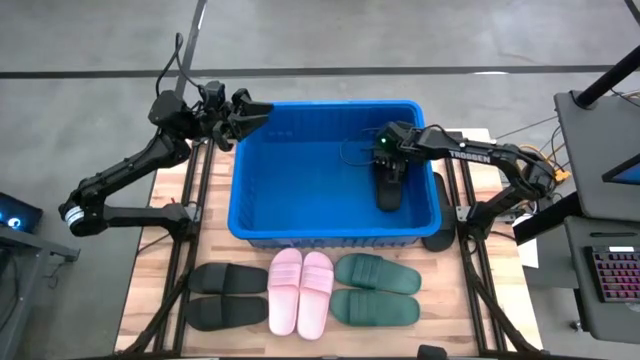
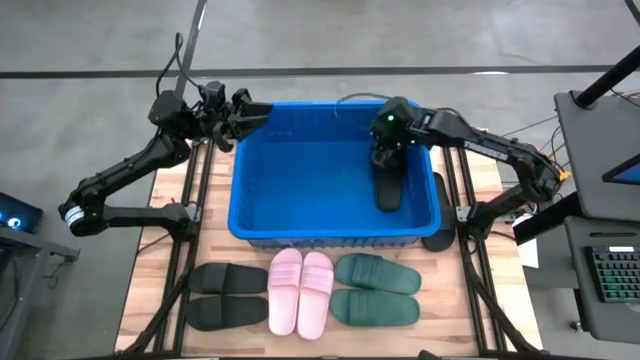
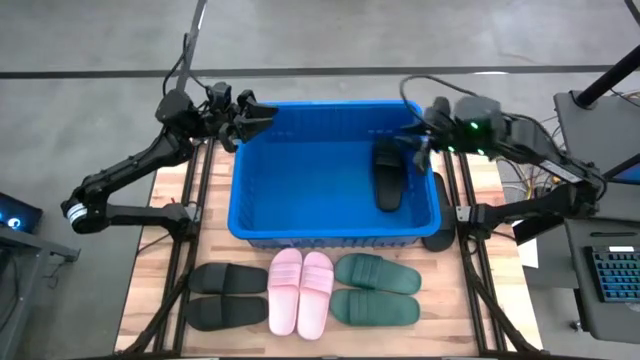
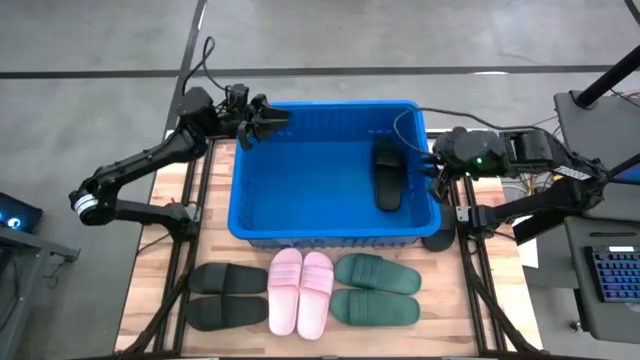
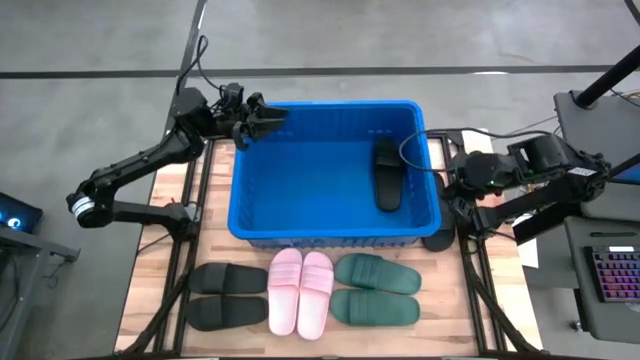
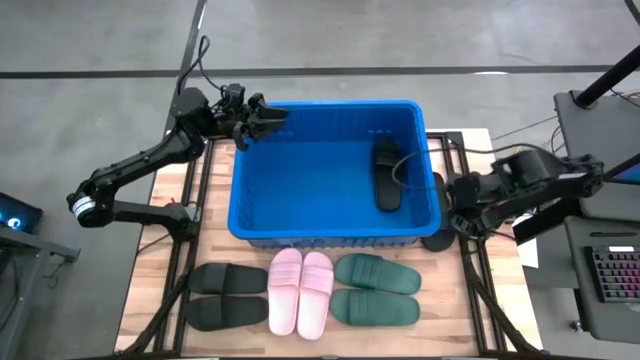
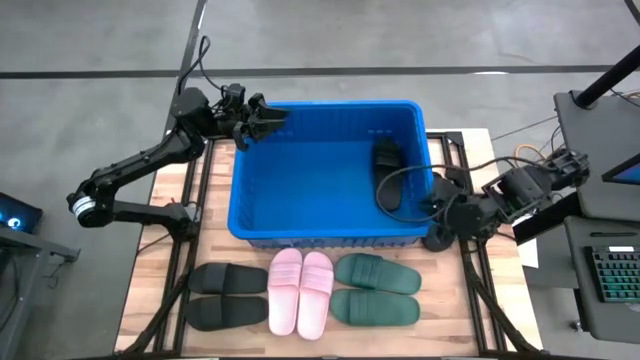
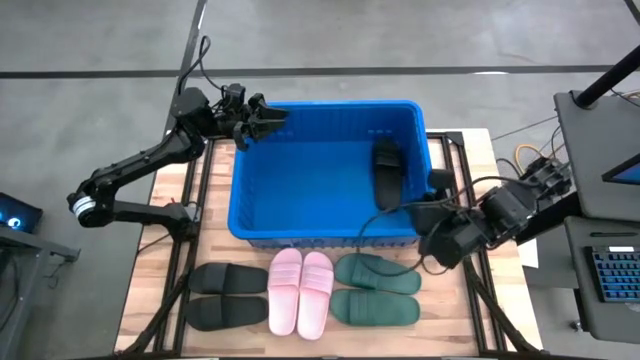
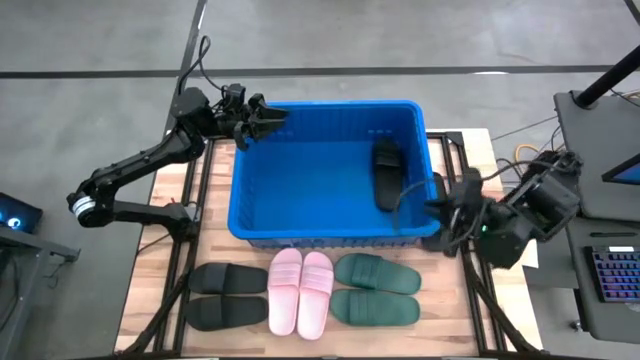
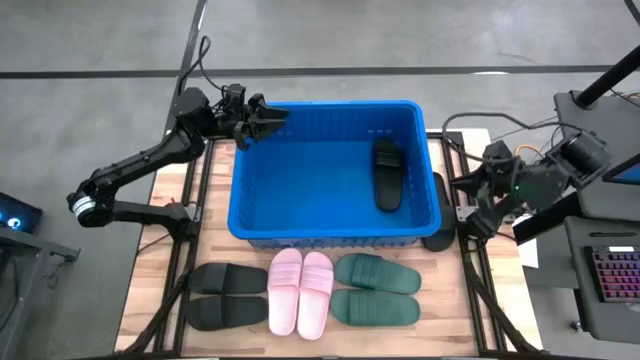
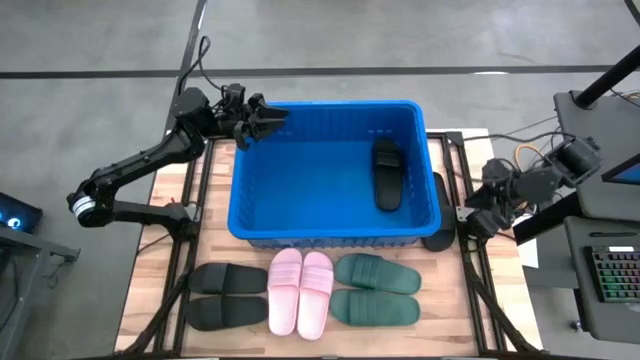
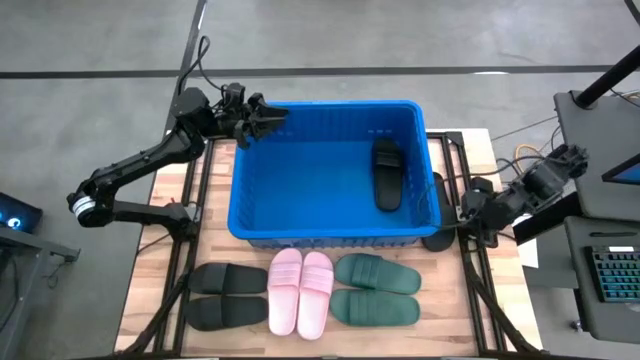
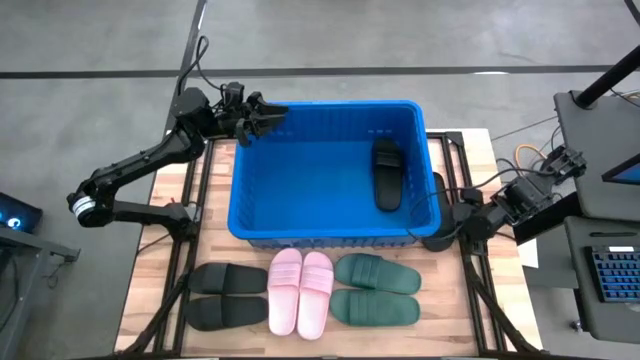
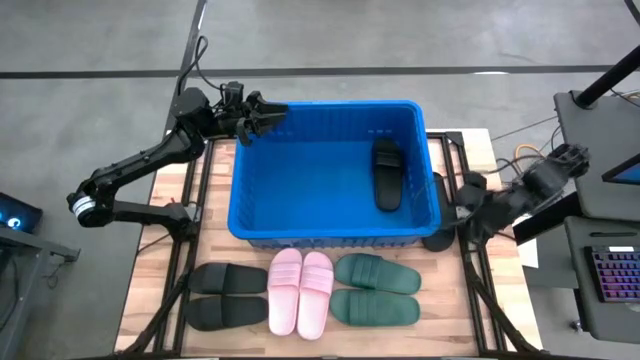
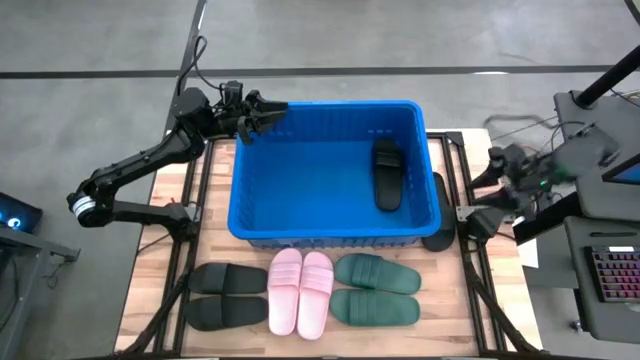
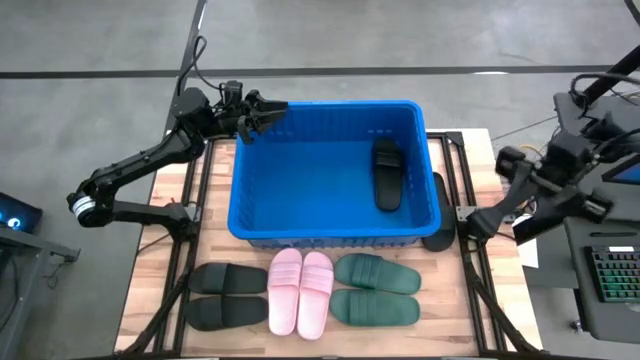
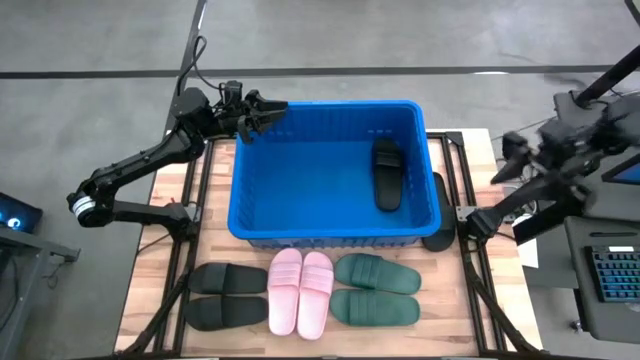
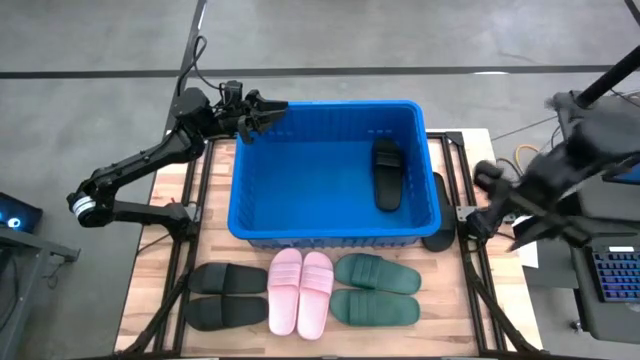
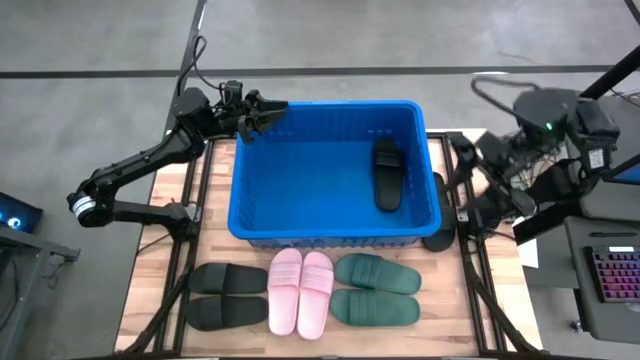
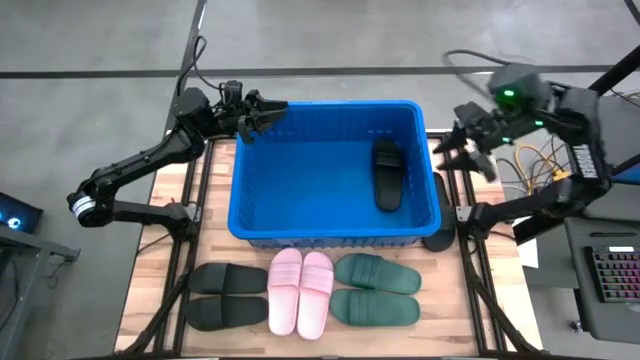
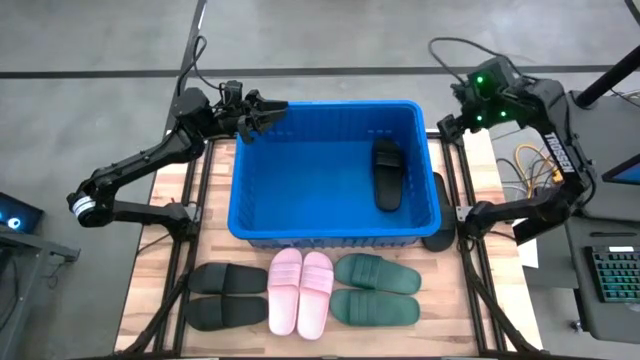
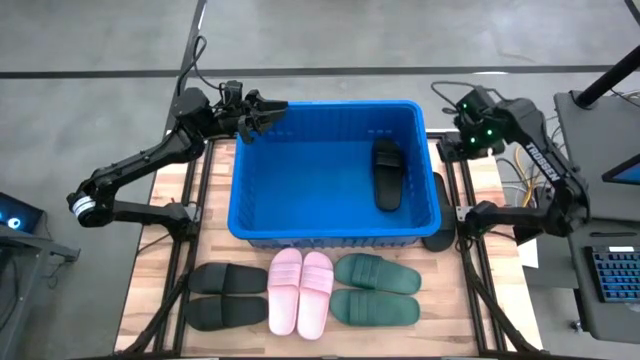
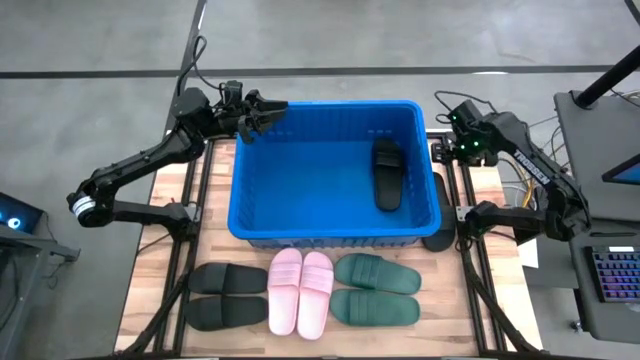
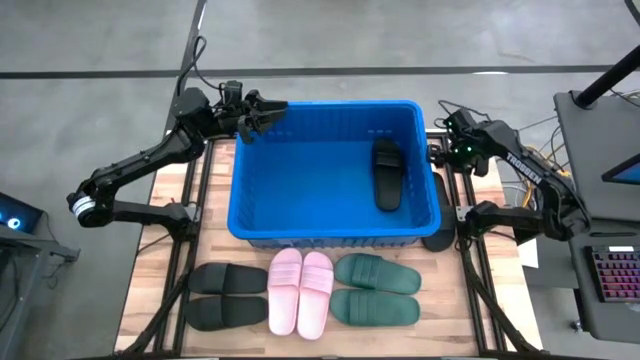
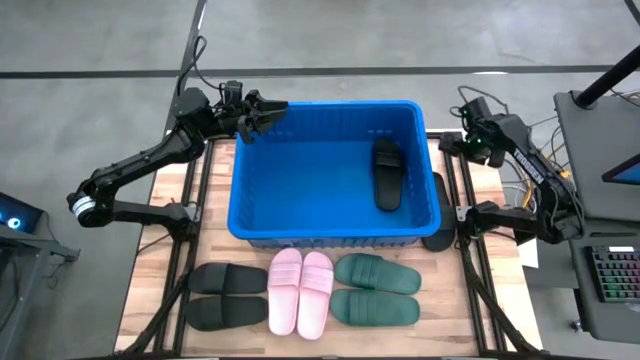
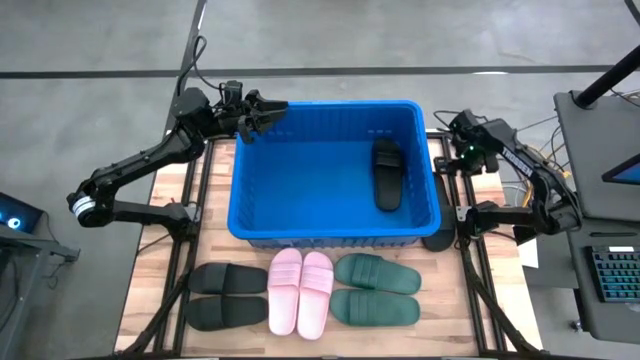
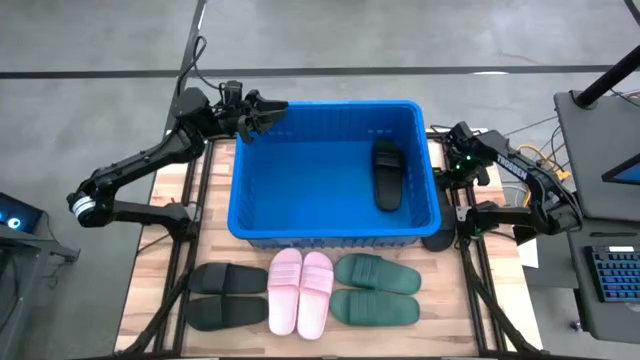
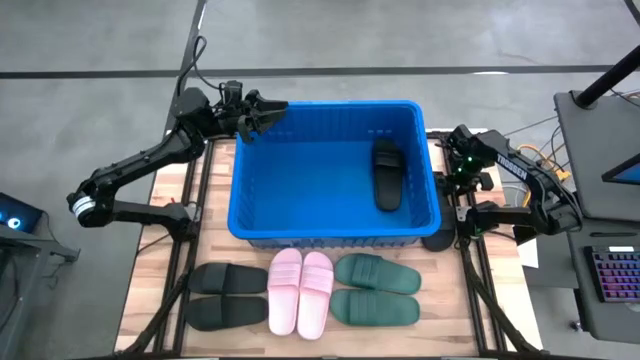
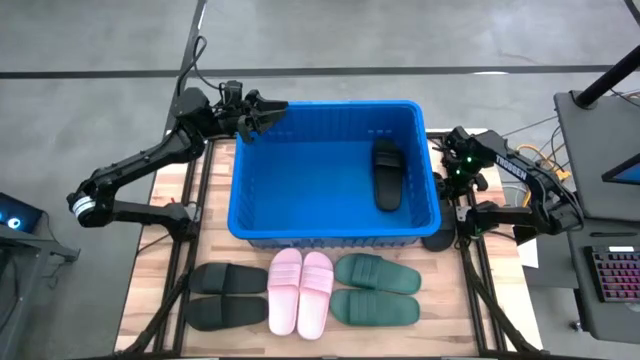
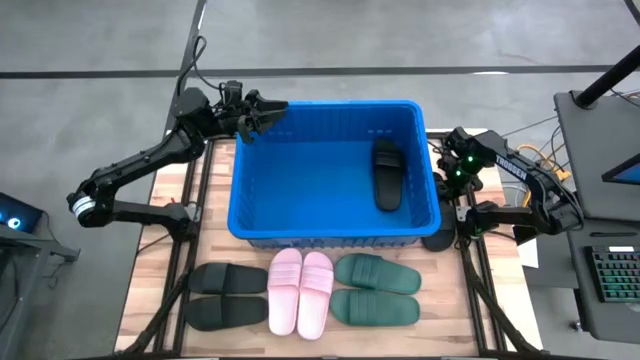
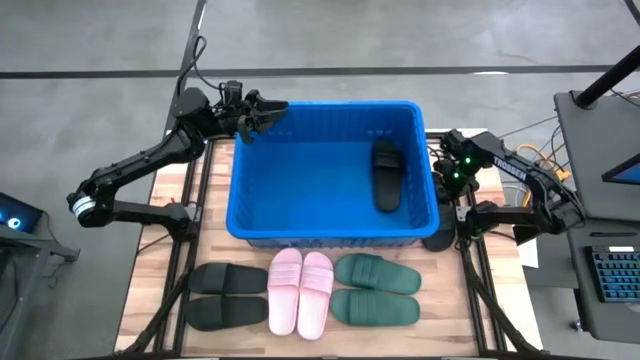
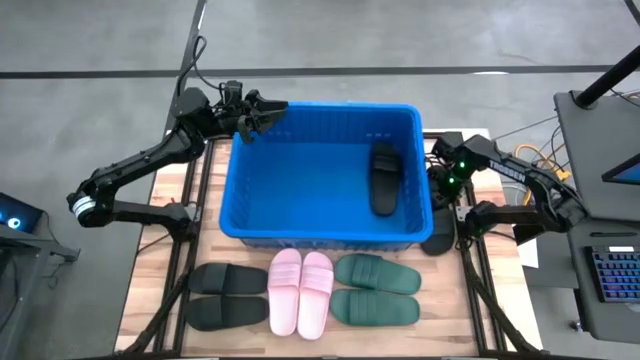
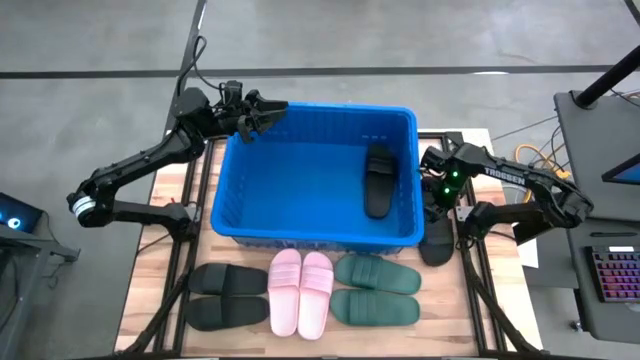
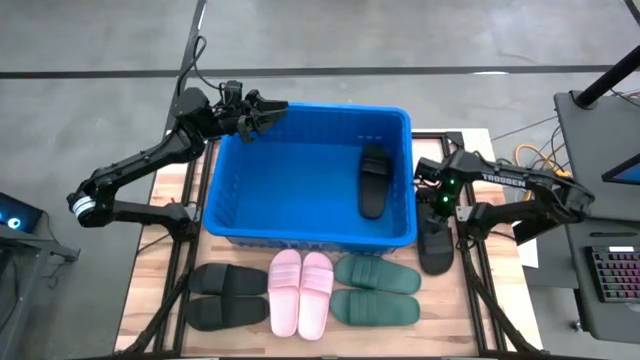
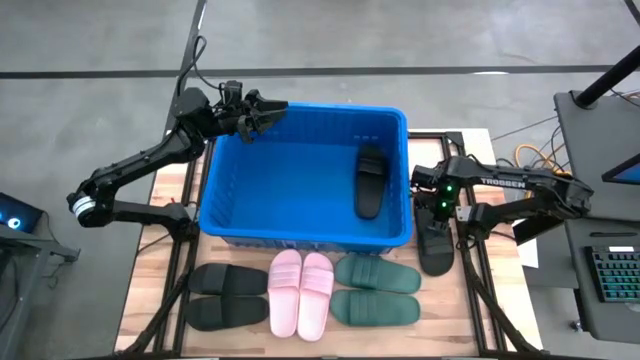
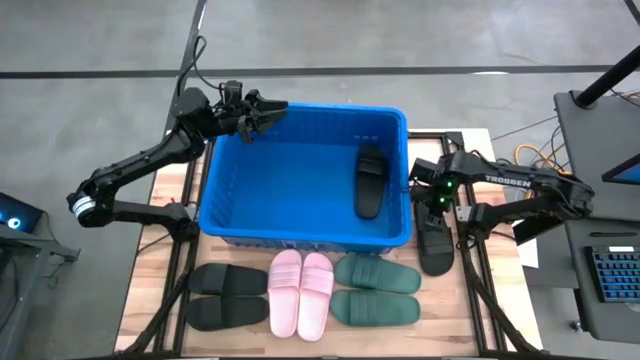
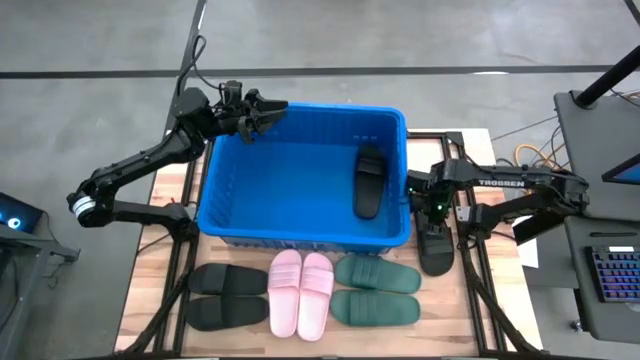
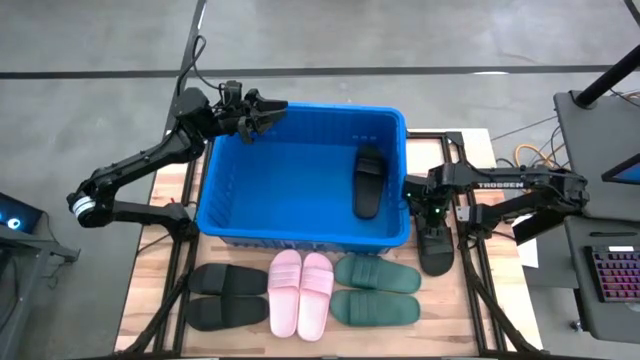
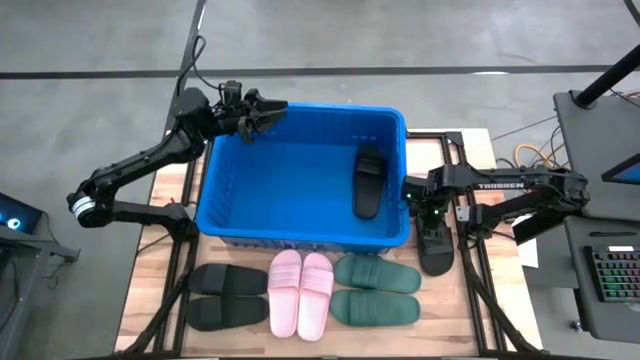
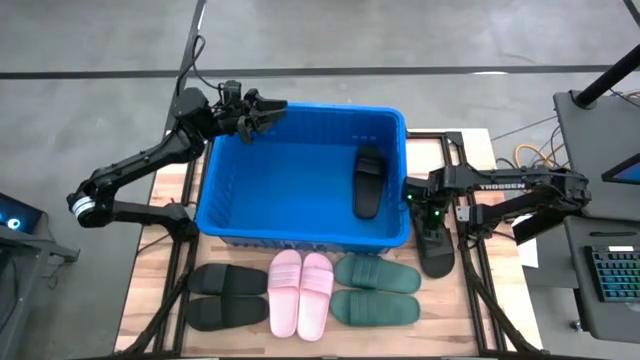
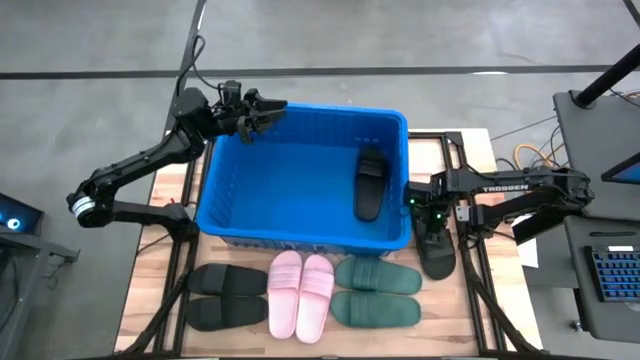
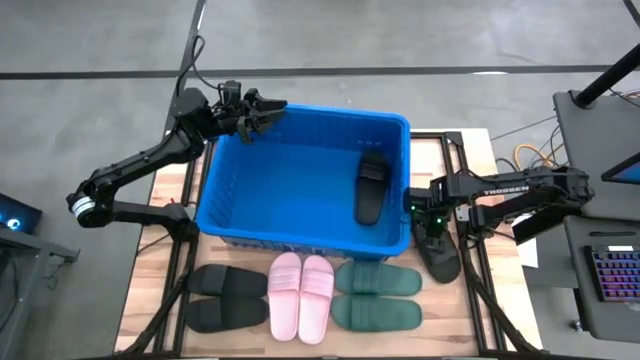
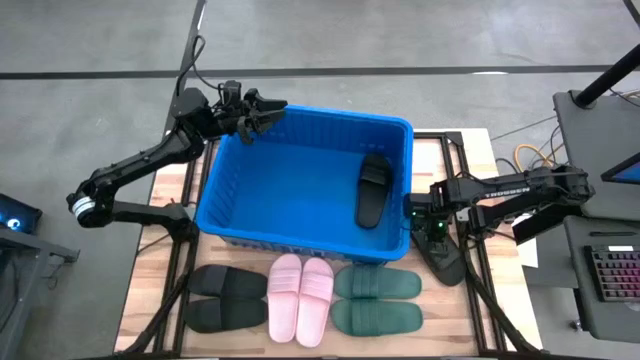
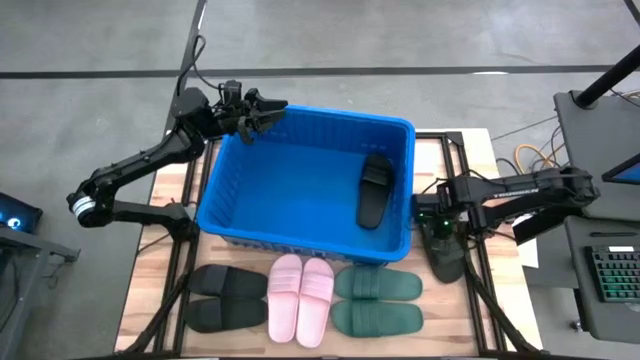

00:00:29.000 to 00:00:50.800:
Task: Pick and place slides into bin
Put the black slide into the blue bin
